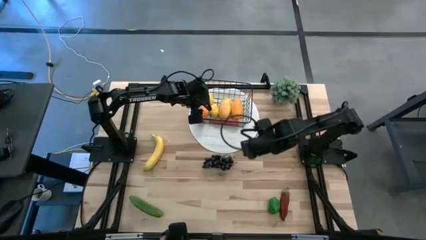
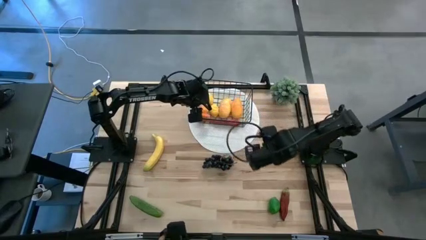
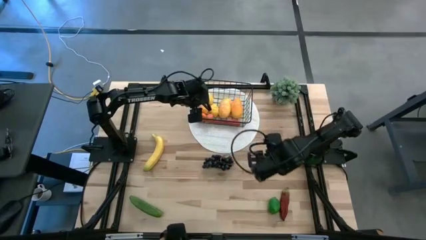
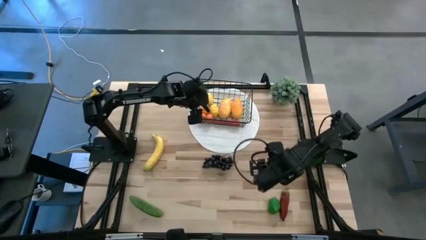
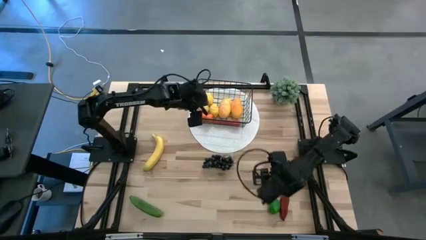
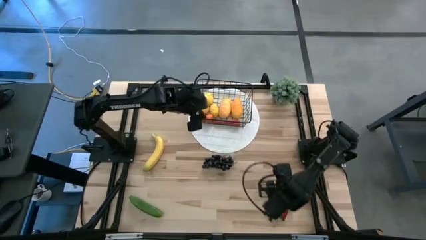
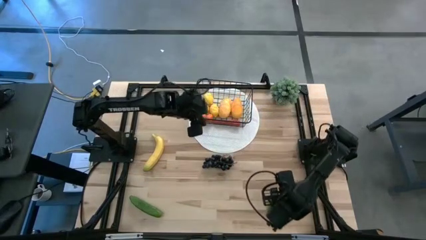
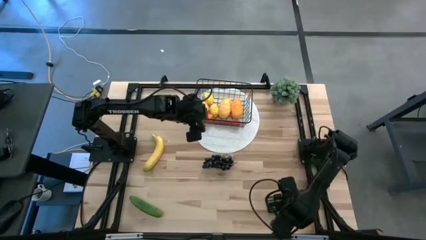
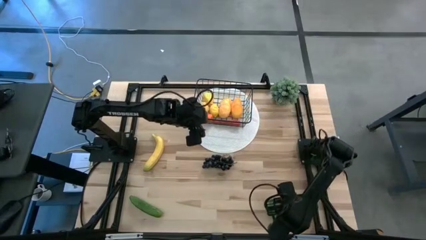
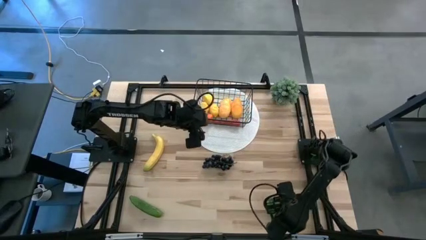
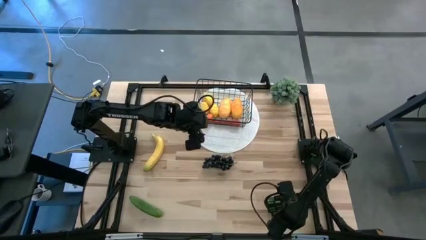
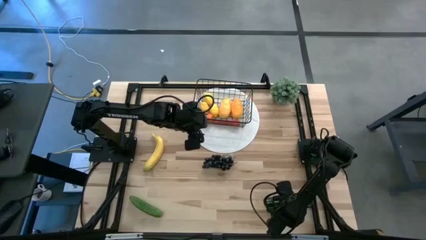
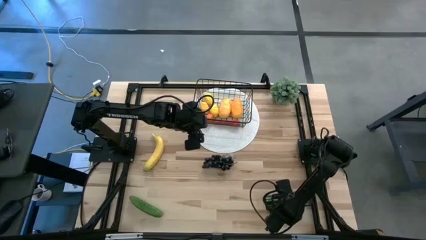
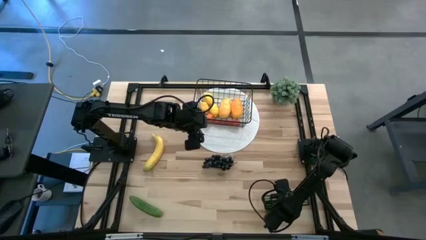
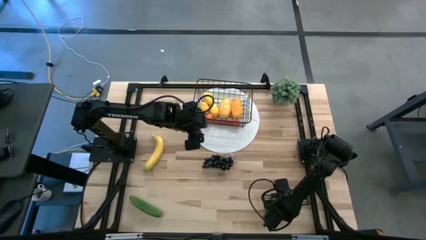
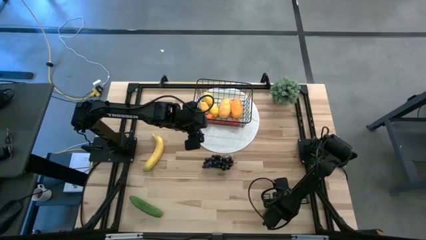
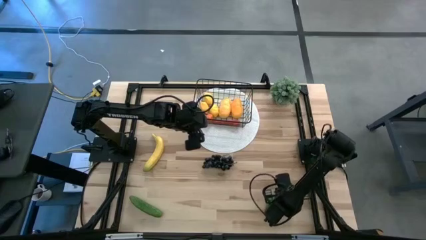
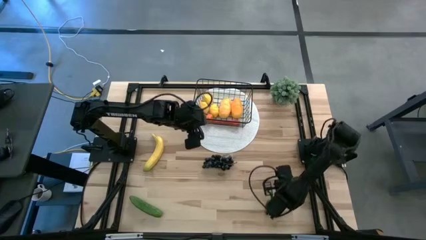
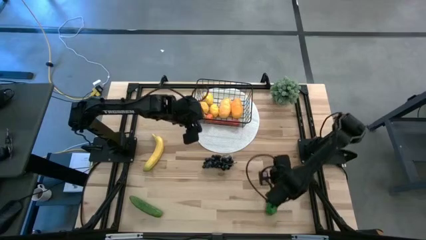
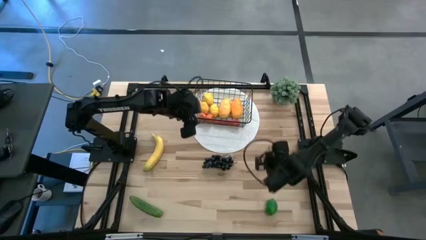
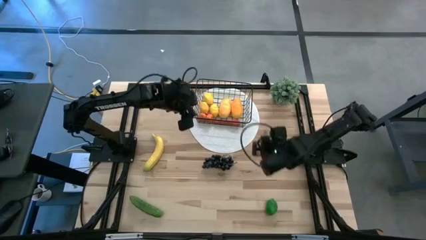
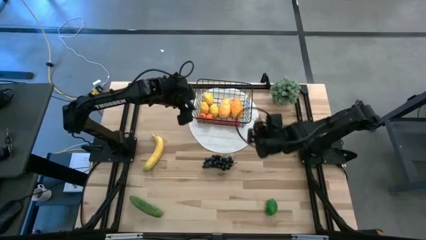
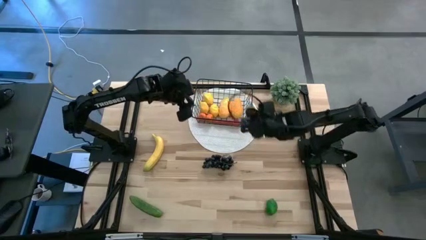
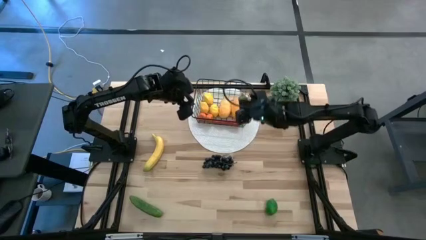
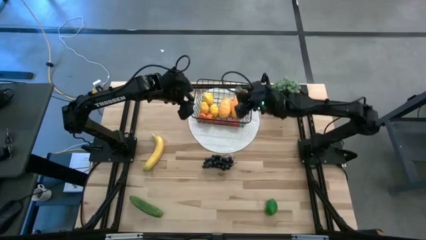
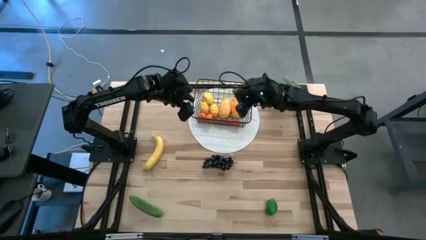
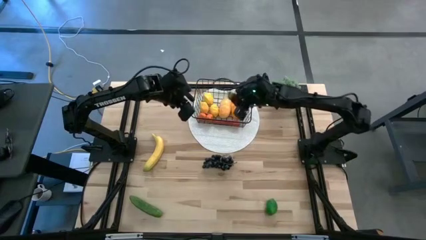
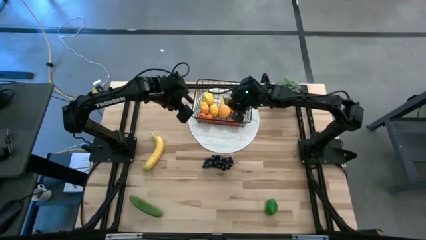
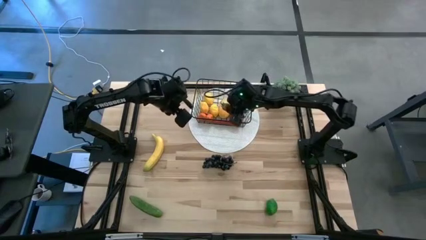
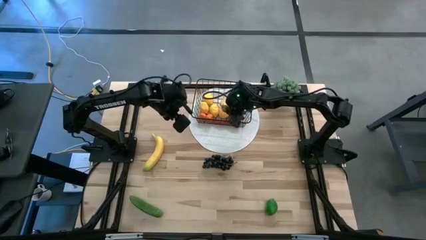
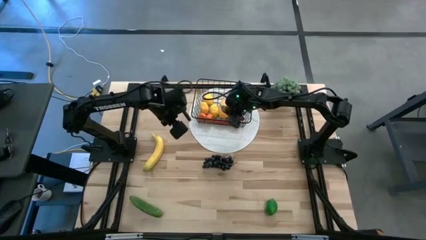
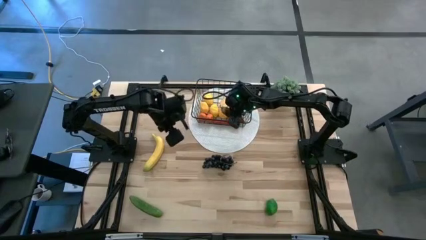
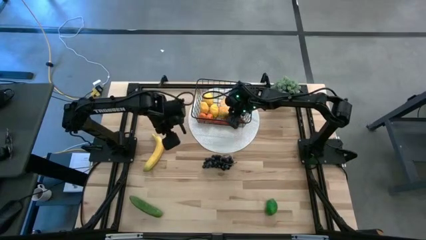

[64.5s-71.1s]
Task: Build produce basket
Put the chili pepper into mesh basket

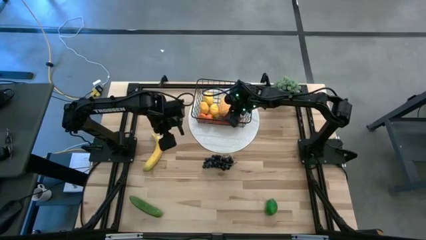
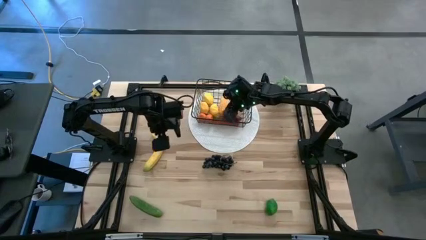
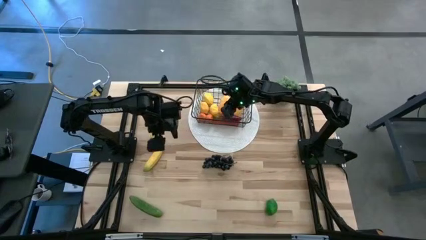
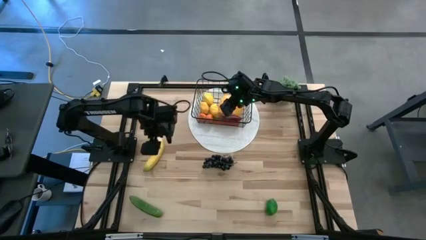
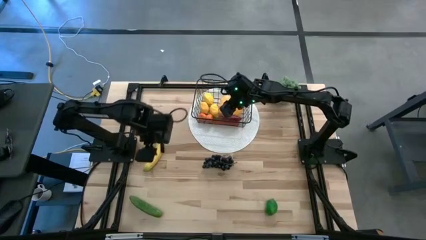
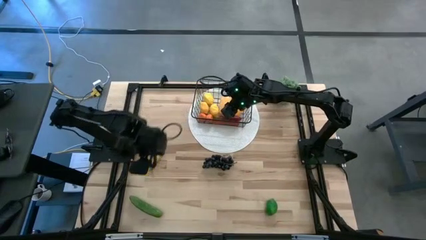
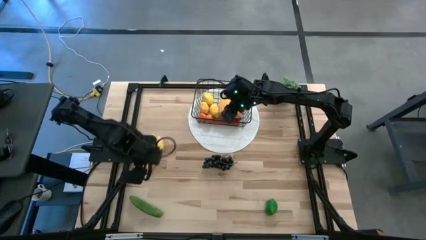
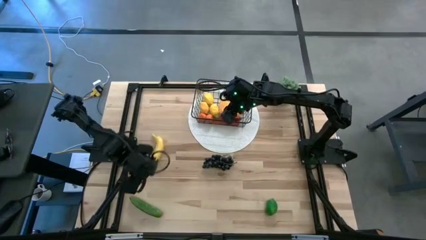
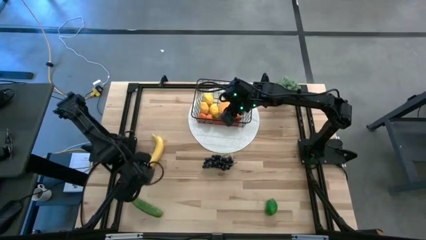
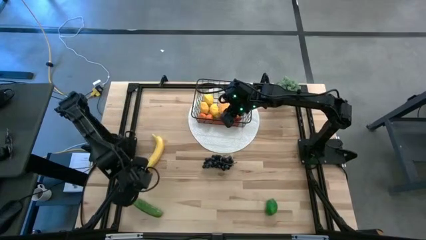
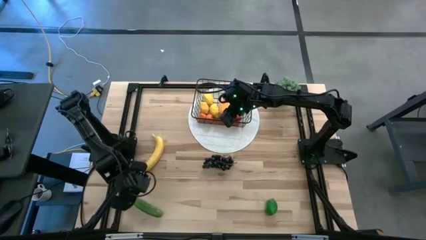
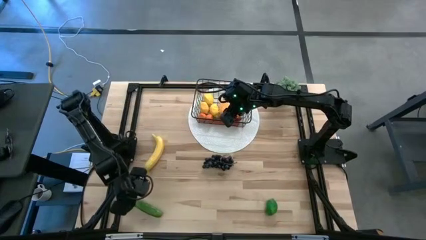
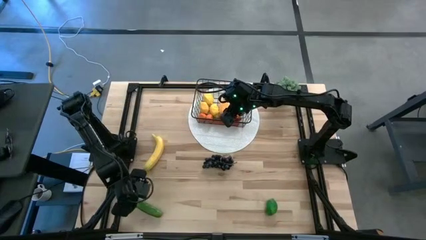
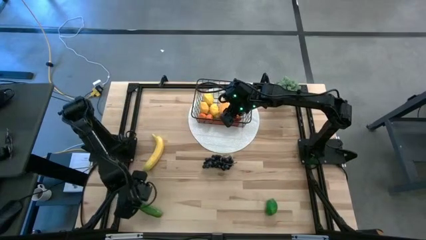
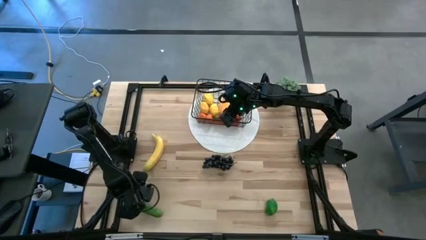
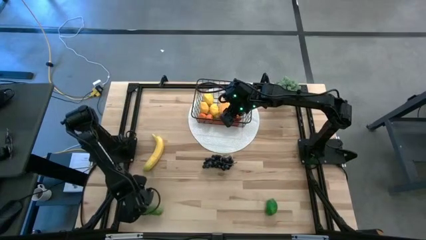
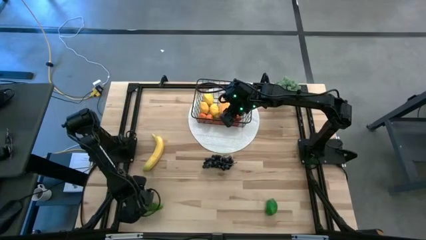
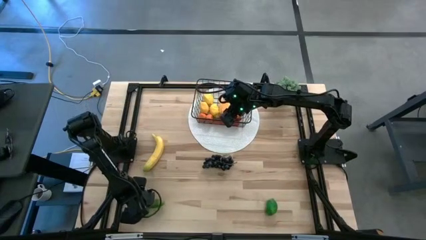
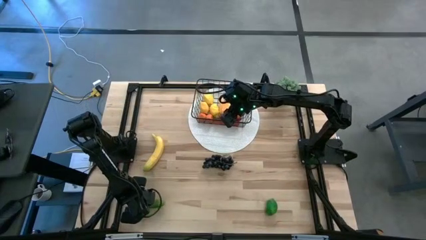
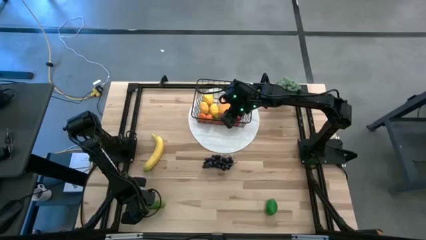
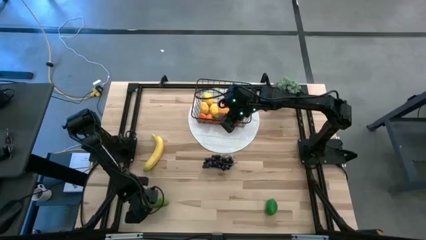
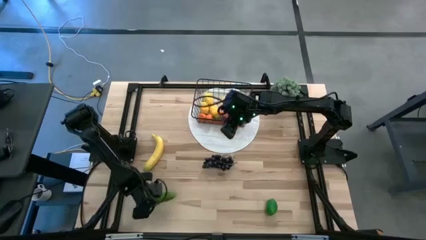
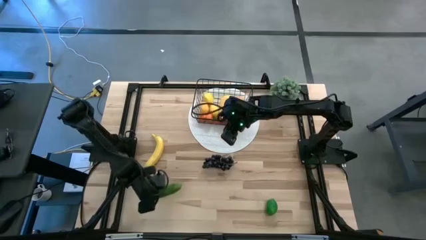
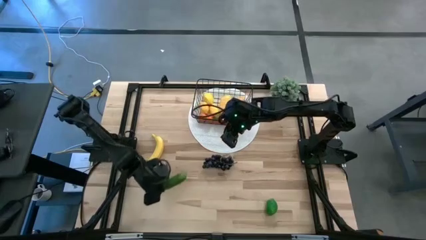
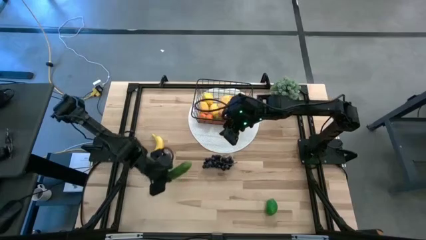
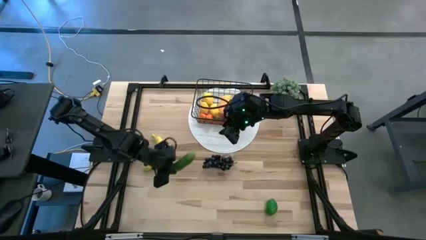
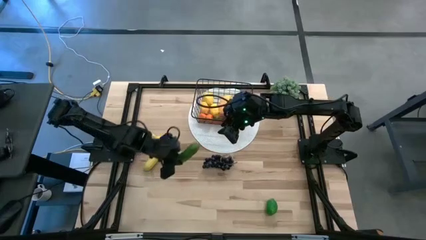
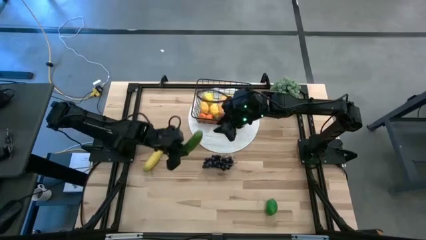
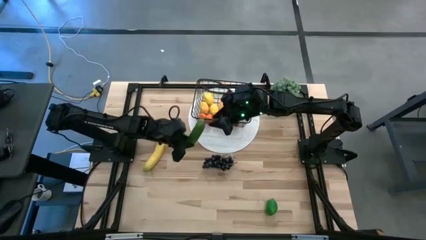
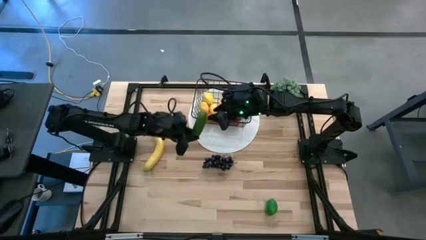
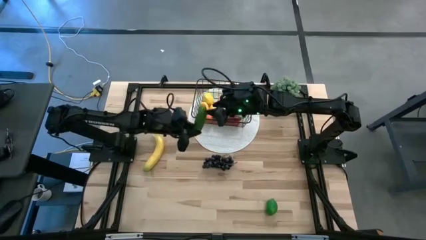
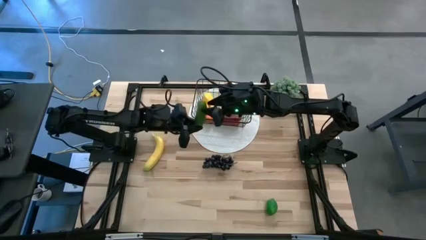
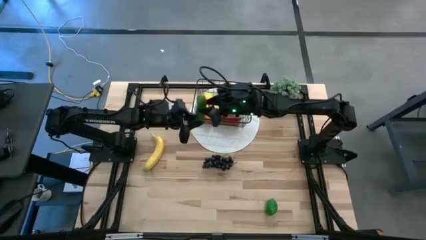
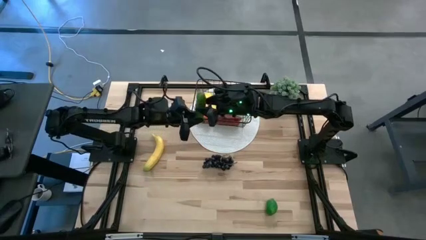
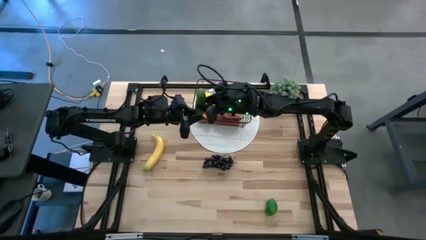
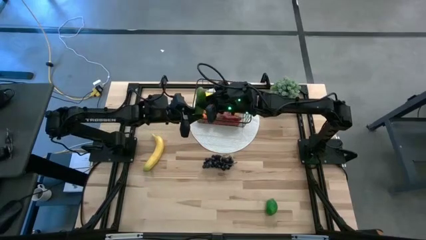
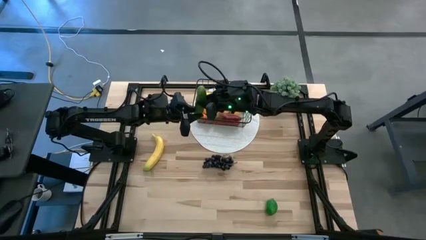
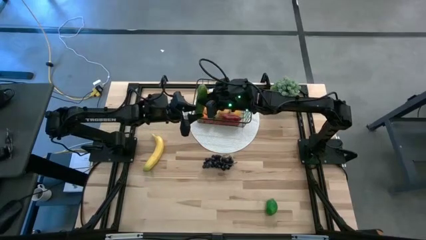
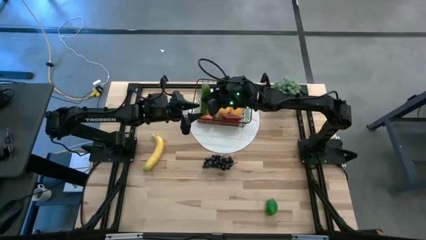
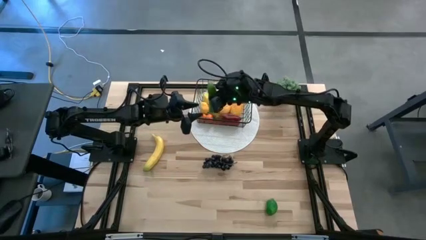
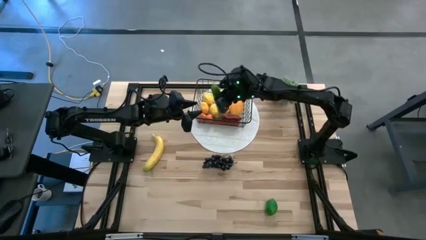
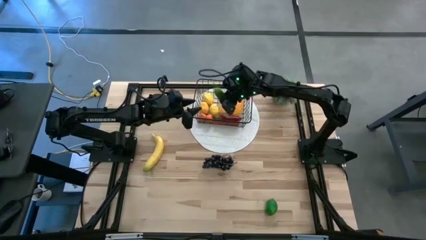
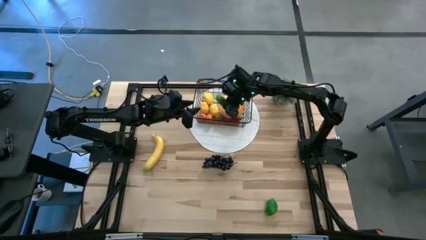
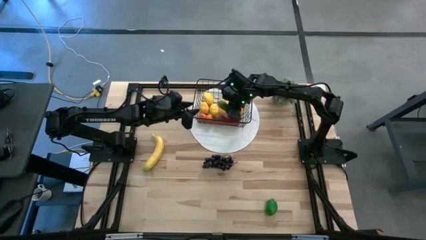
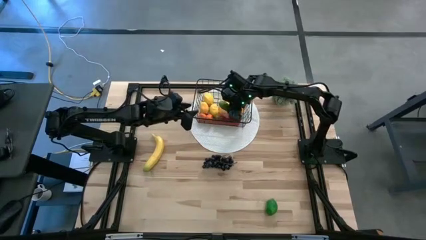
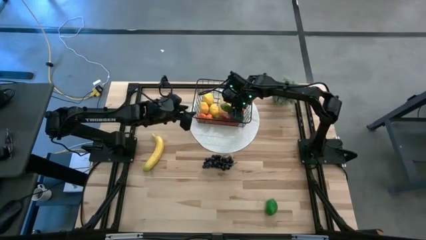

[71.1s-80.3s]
Put the cucumber into mesh basket
